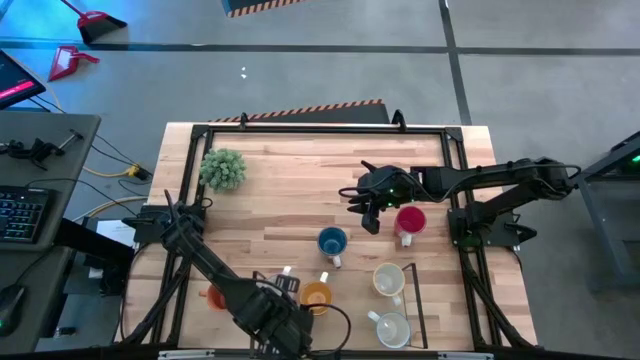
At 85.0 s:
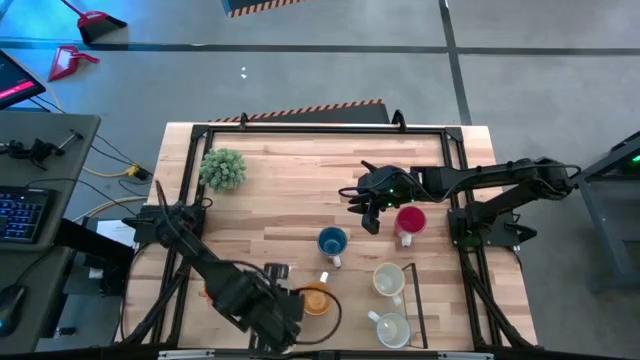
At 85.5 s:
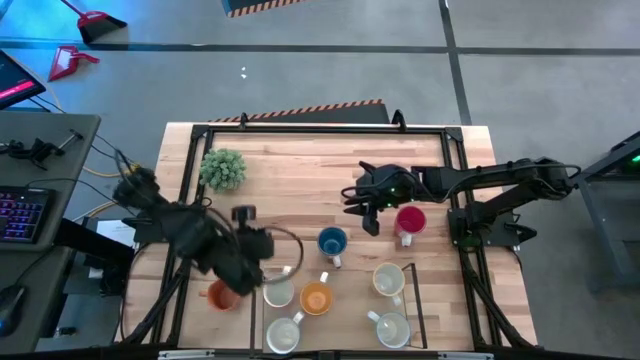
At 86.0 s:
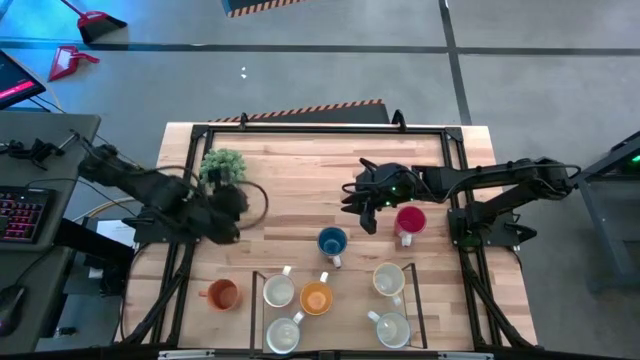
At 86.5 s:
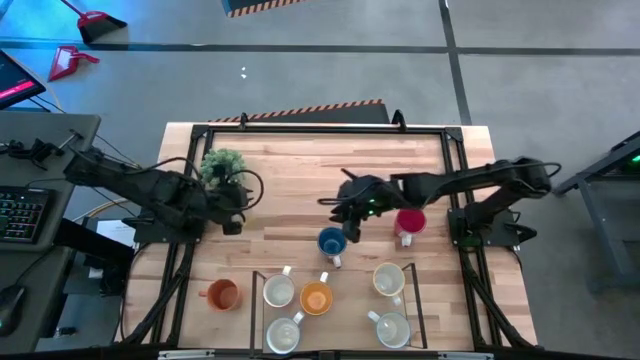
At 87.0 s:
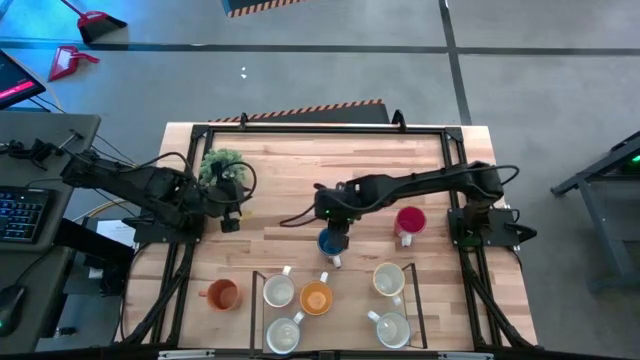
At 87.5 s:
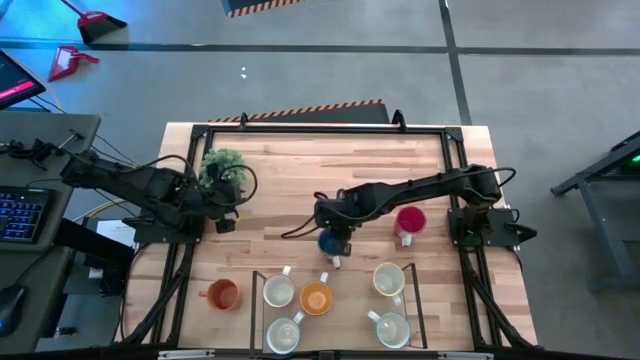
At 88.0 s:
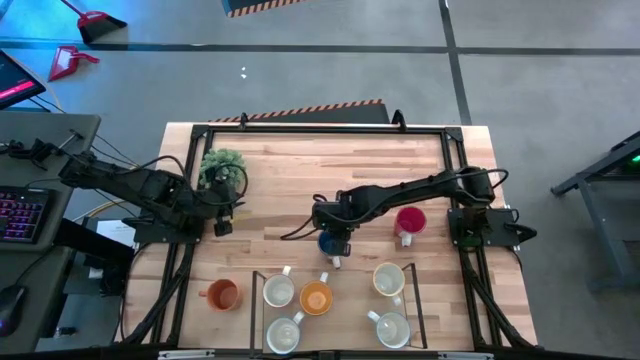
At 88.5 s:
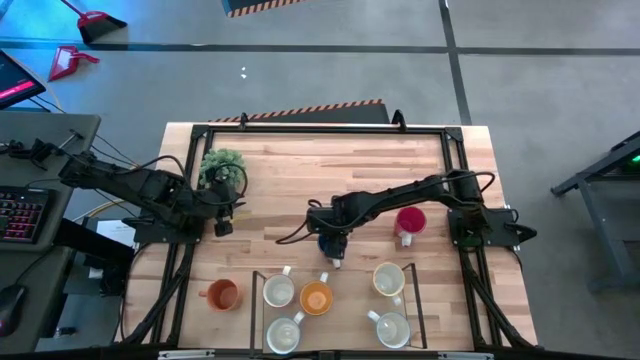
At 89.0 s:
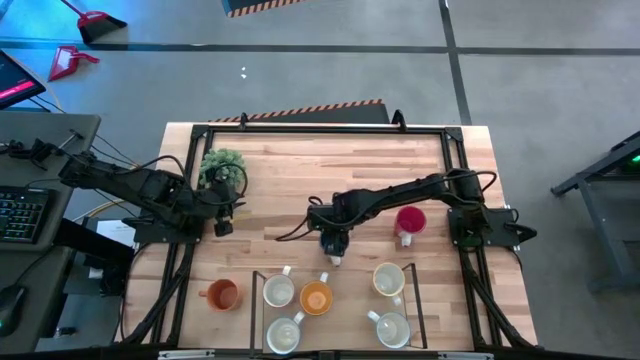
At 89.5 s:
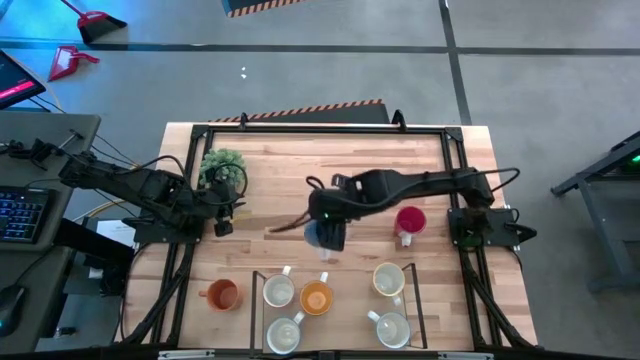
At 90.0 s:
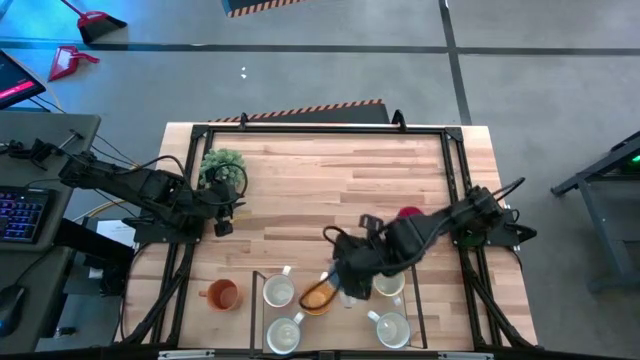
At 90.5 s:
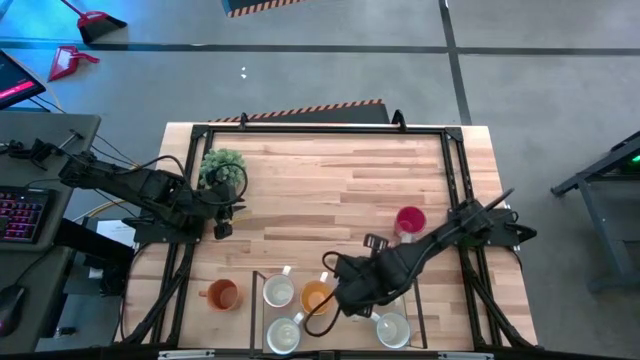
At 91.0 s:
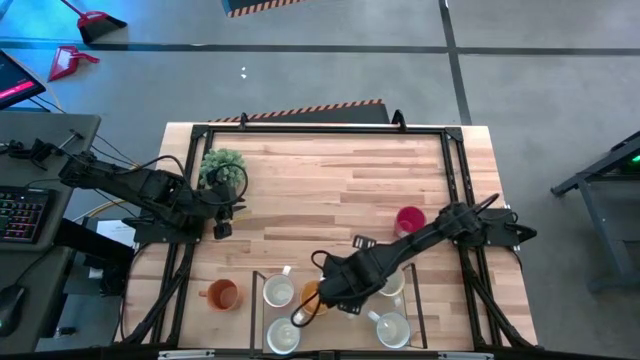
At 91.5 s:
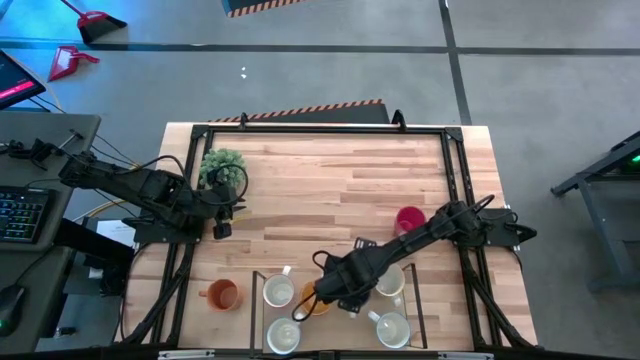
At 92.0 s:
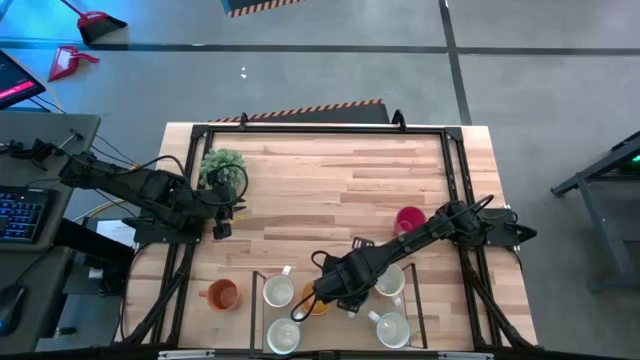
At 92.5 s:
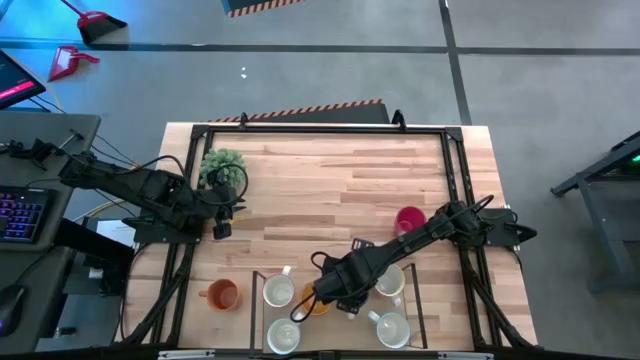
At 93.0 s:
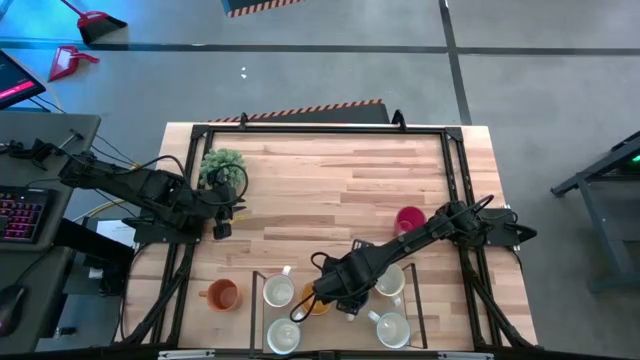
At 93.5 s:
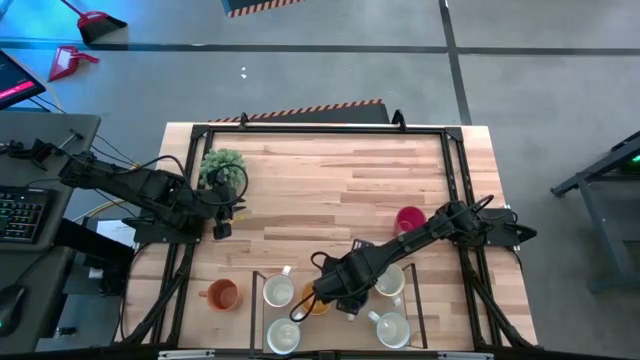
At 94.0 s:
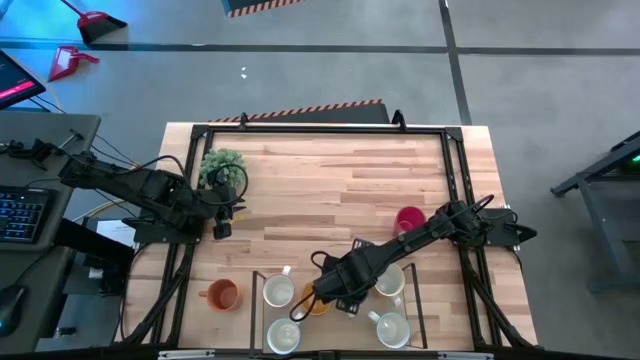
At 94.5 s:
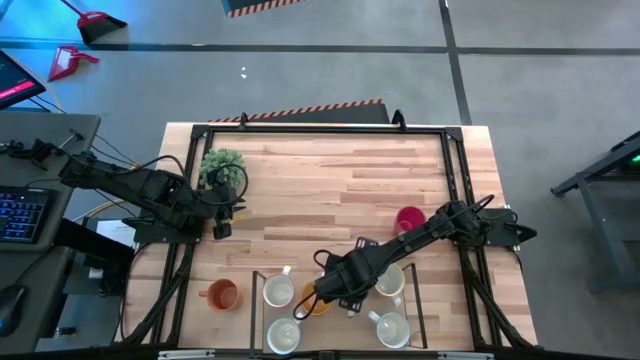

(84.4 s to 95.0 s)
Task: Place coffee mugs
Put the blue mug on the shelf

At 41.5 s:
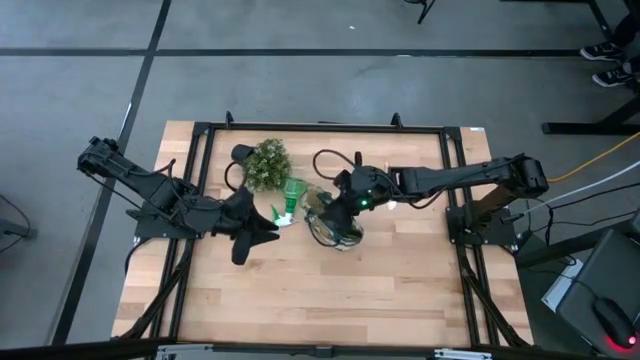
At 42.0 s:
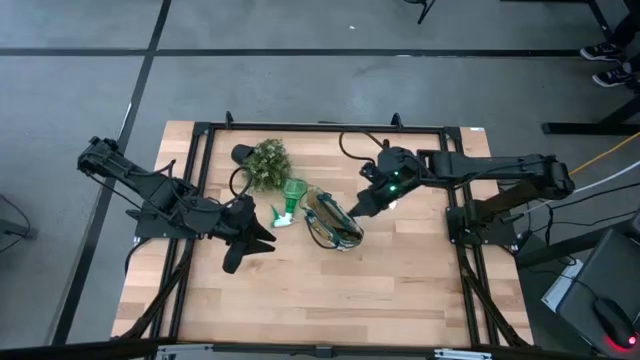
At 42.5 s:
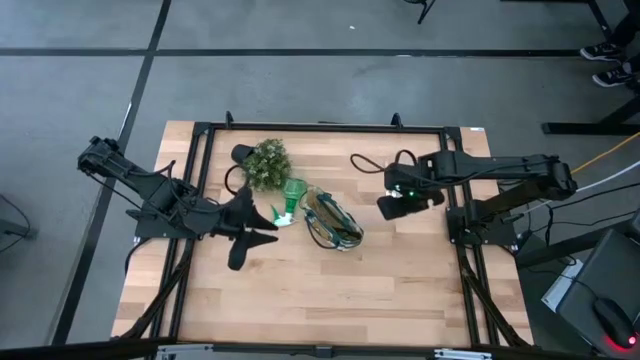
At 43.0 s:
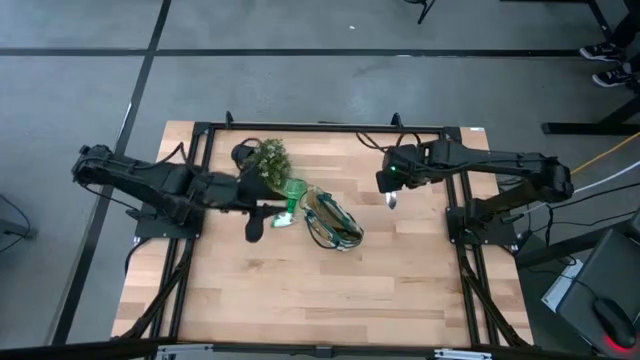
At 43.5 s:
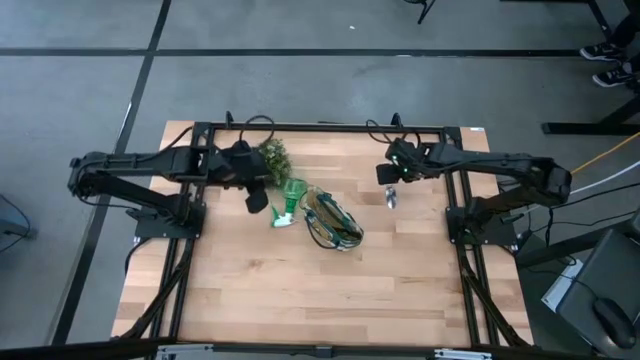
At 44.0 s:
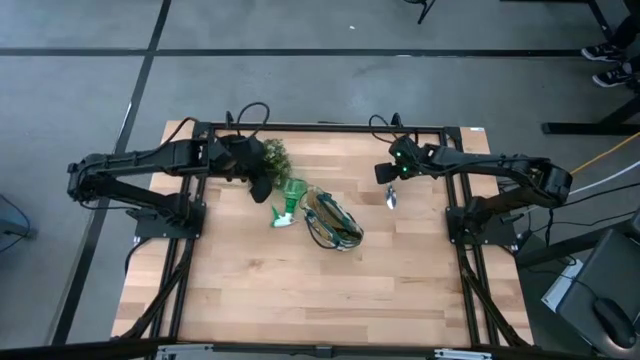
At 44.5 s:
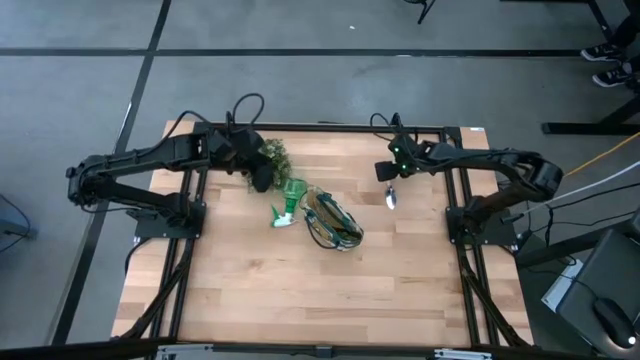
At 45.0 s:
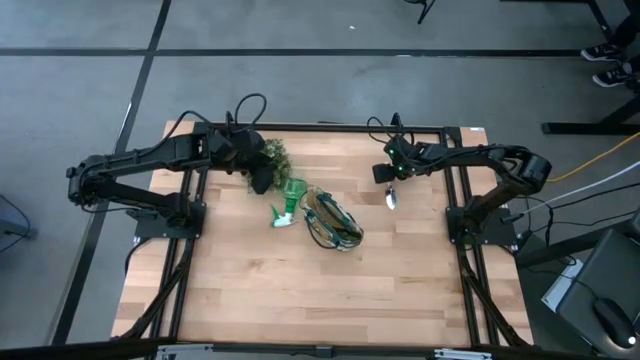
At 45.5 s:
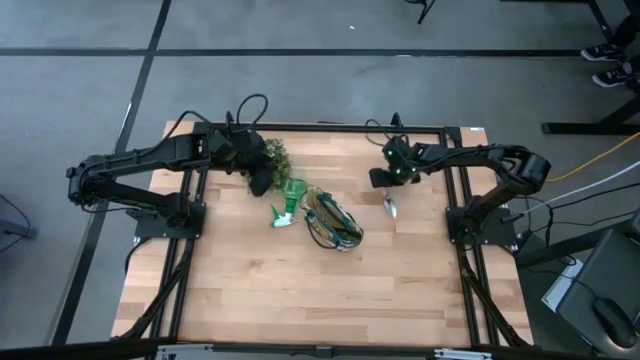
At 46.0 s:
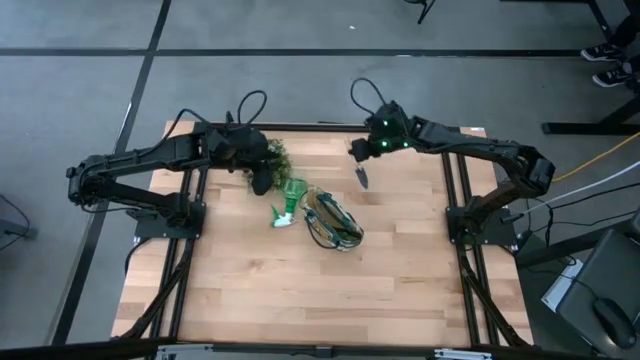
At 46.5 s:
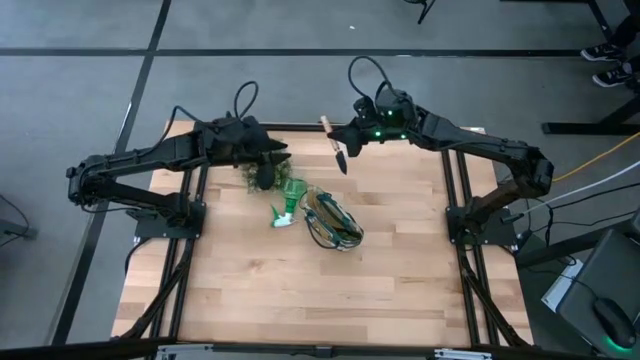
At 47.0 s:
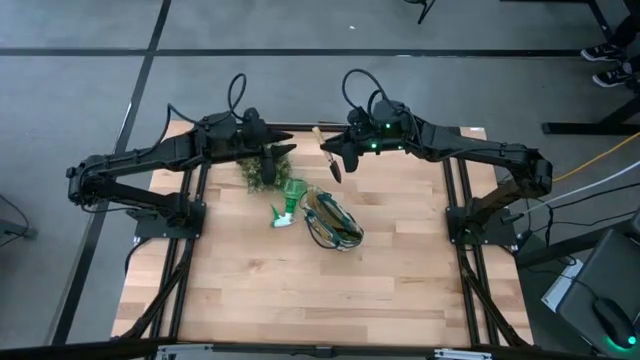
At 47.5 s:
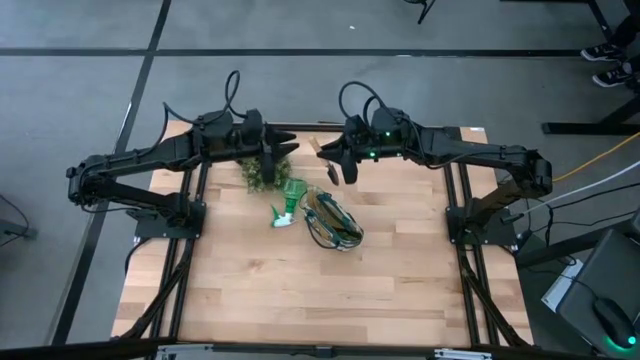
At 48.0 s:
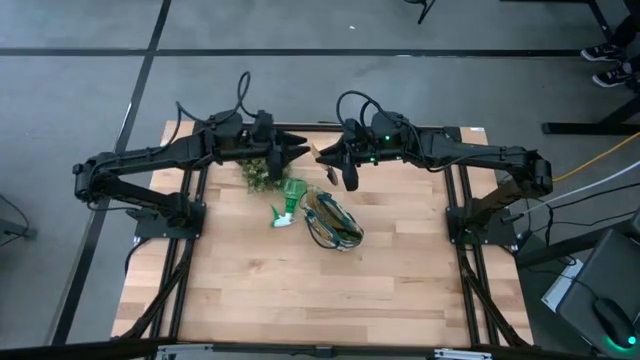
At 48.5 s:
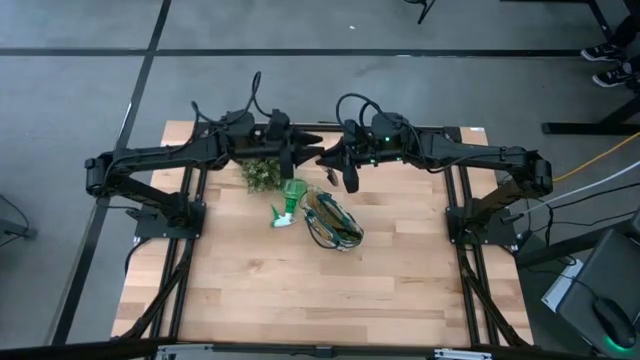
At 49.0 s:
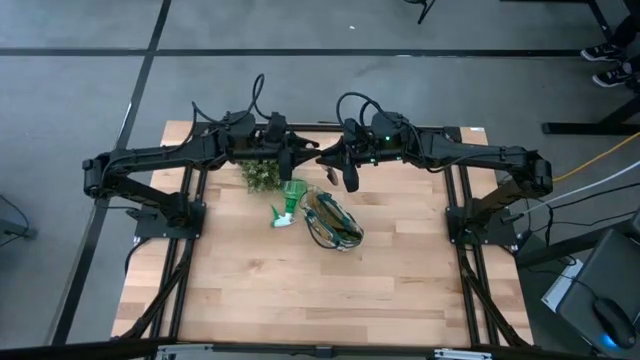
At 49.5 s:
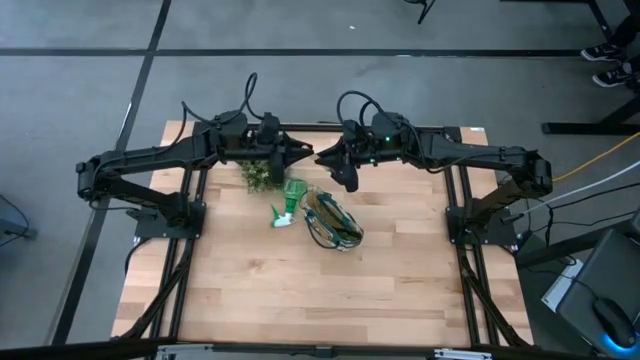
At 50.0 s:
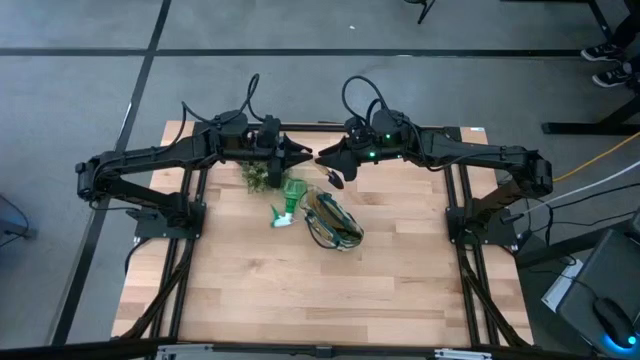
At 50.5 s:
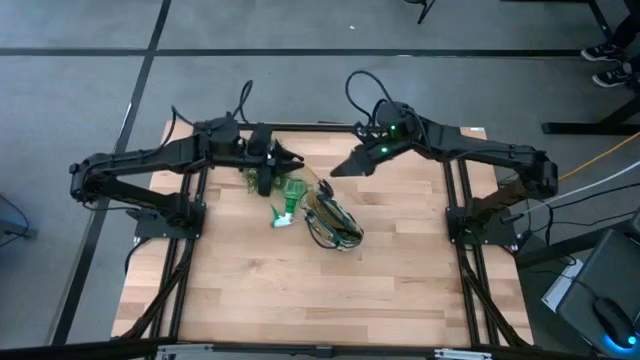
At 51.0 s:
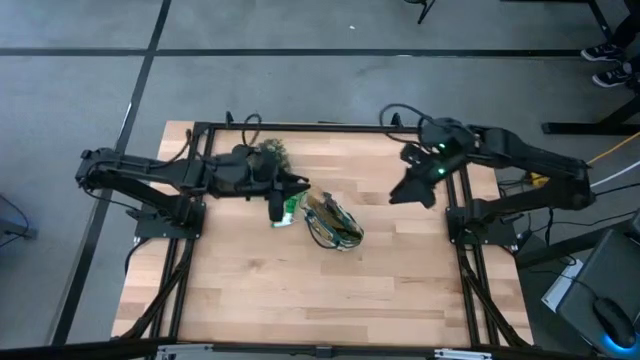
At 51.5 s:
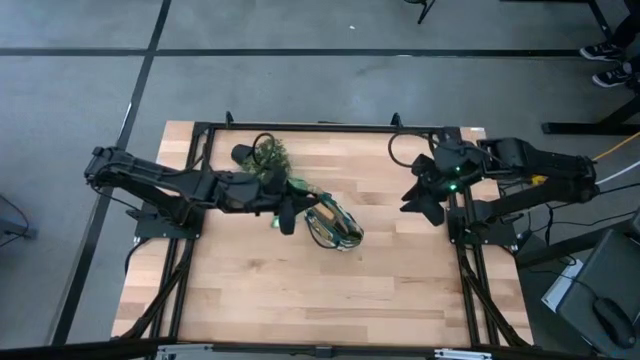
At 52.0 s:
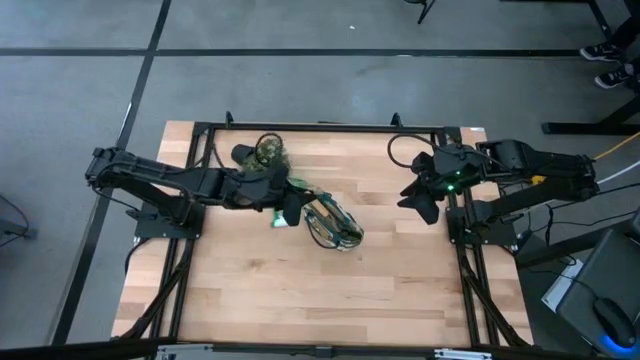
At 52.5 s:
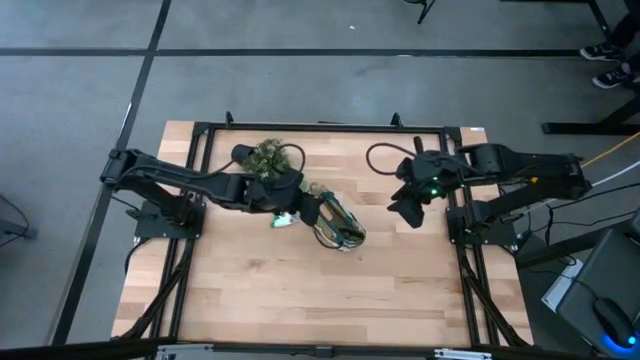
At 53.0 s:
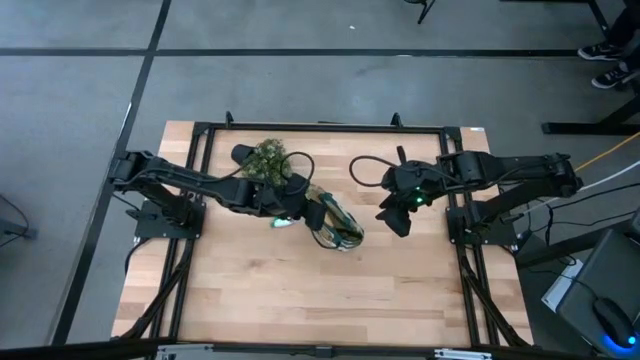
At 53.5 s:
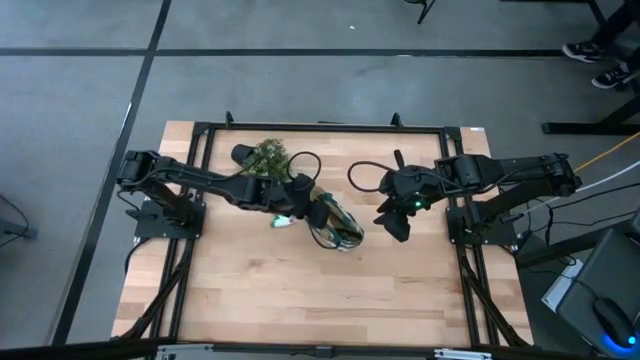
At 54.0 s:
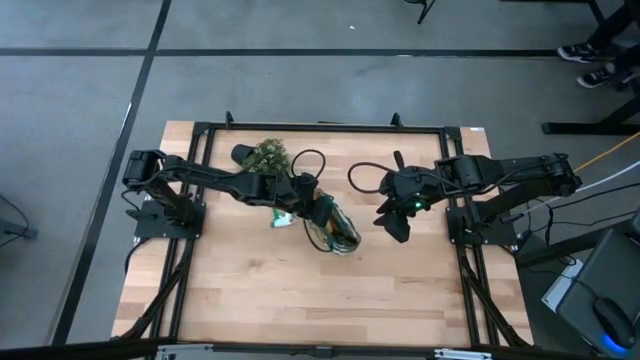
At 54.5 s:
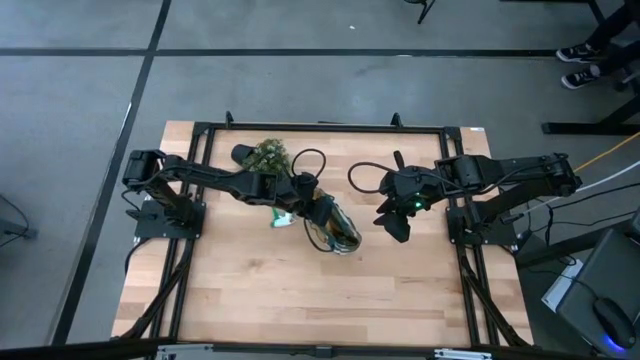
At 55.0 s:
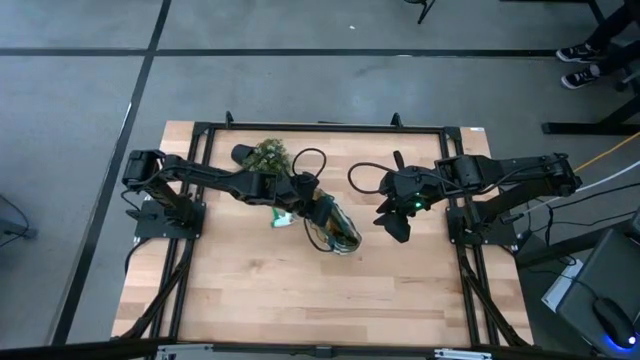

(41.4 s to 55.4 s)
Task: Pick & Place Garden tools in Gardening bag
Put the light brown trowel into the light brown gardening bag
